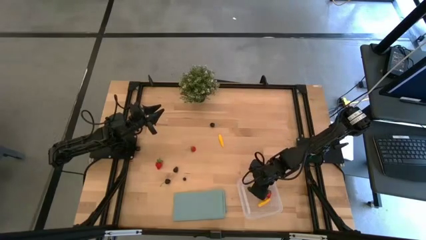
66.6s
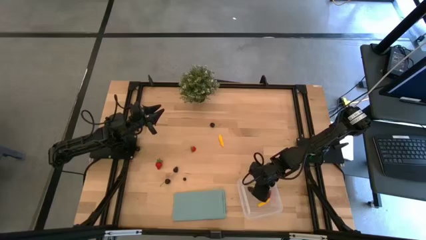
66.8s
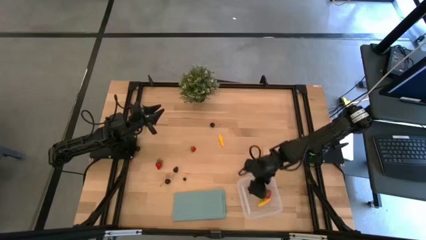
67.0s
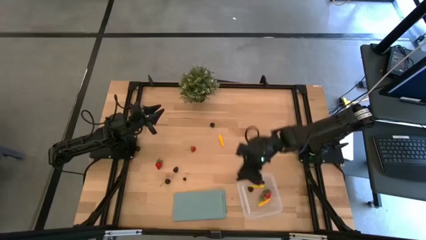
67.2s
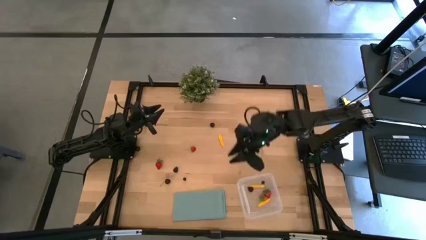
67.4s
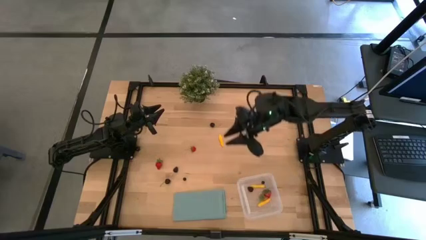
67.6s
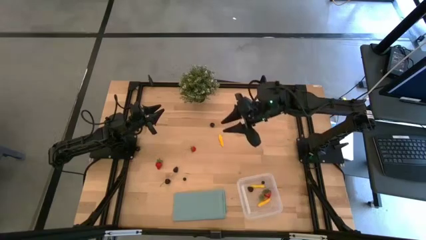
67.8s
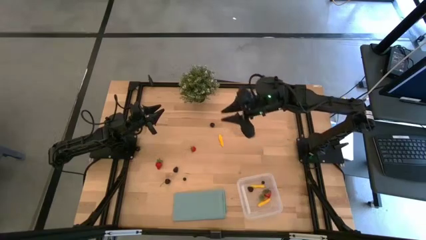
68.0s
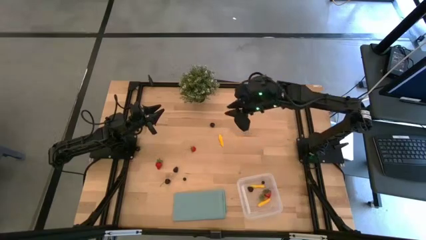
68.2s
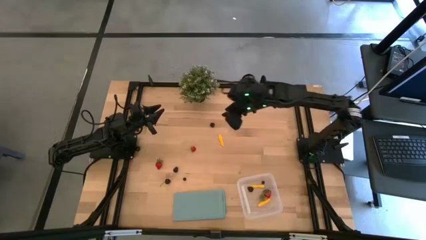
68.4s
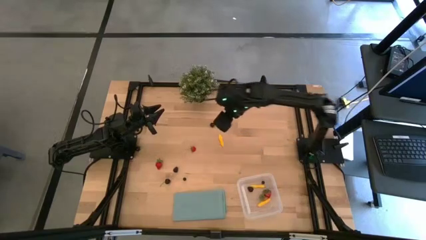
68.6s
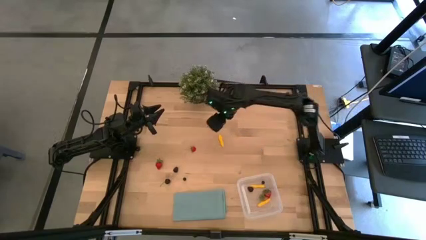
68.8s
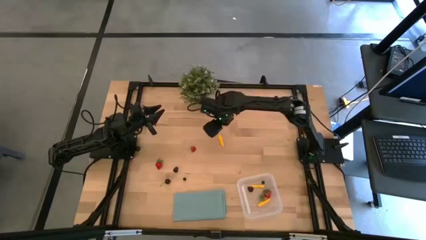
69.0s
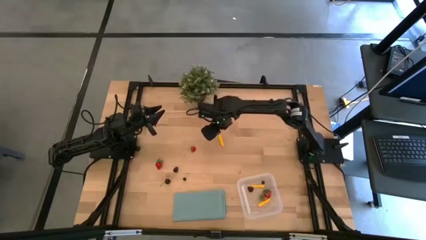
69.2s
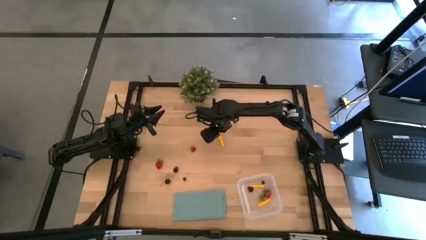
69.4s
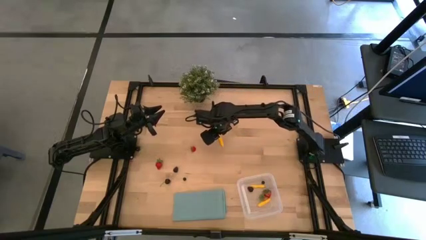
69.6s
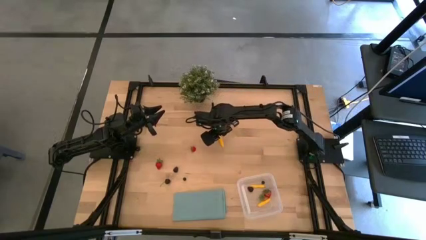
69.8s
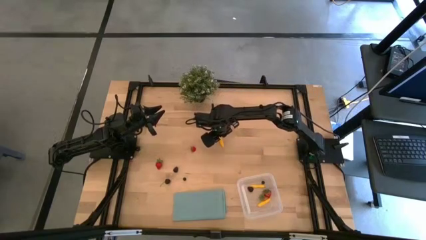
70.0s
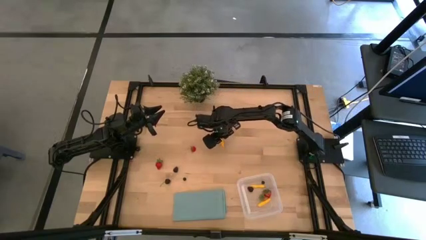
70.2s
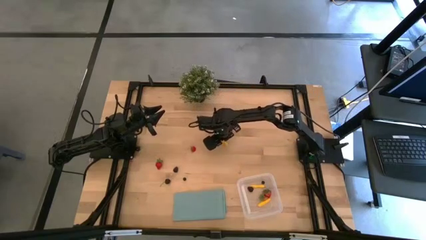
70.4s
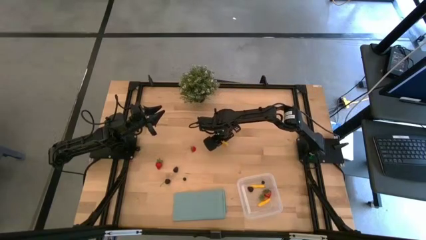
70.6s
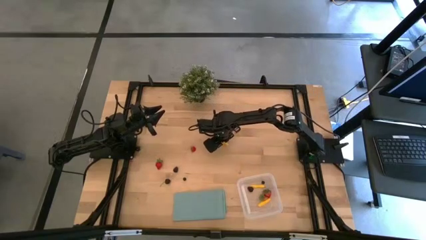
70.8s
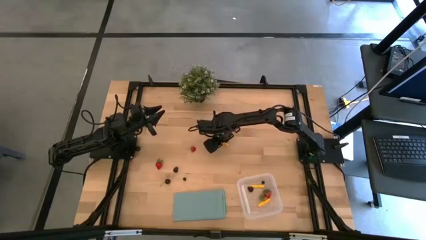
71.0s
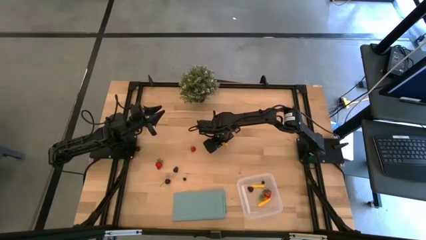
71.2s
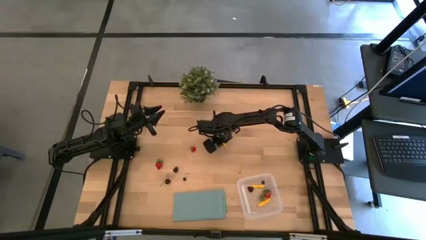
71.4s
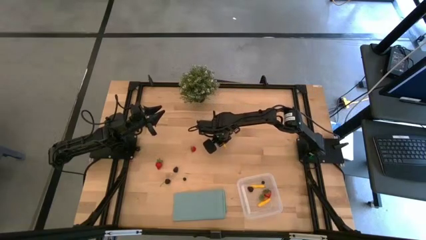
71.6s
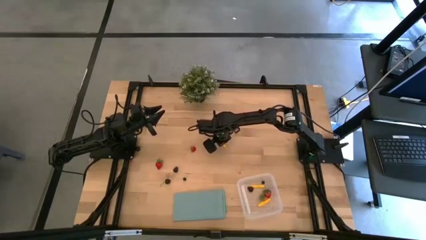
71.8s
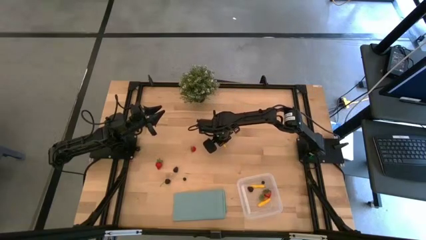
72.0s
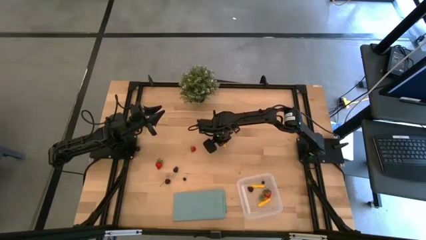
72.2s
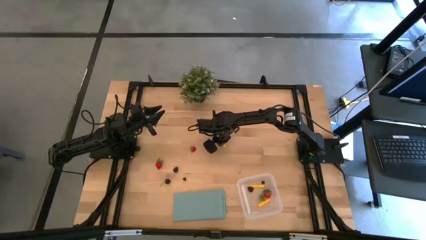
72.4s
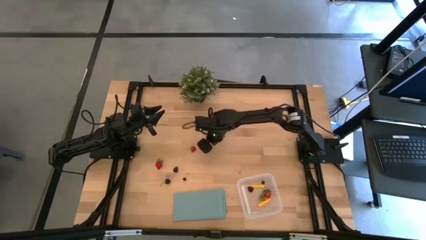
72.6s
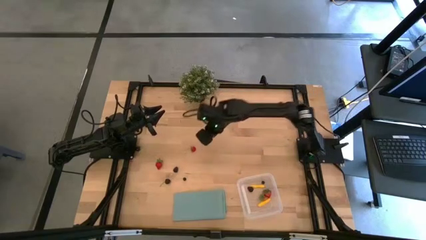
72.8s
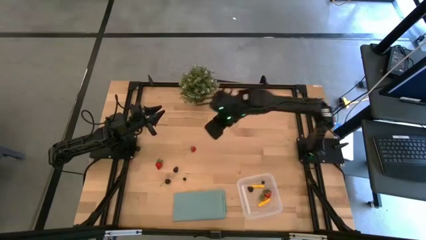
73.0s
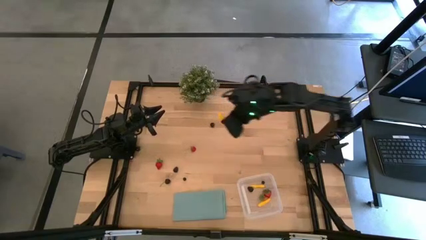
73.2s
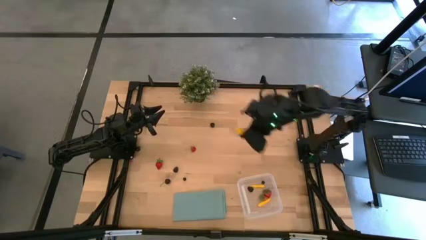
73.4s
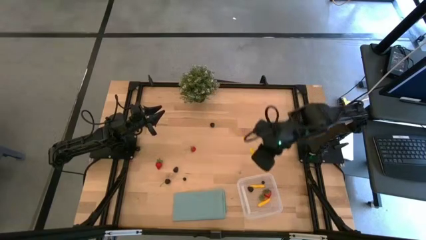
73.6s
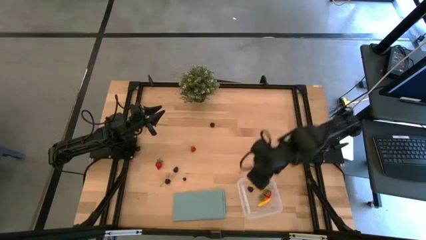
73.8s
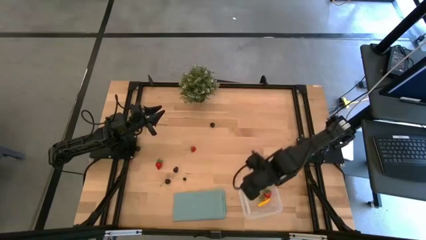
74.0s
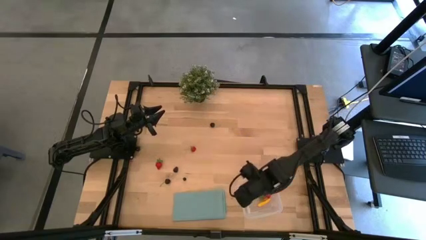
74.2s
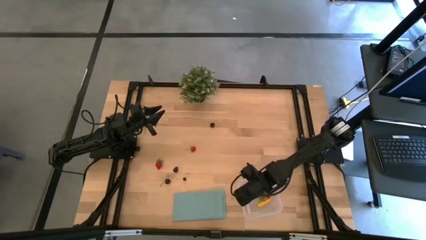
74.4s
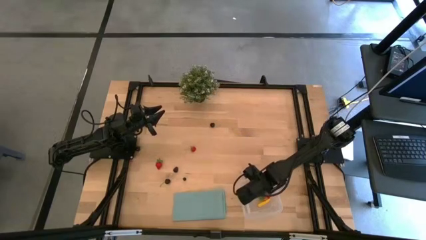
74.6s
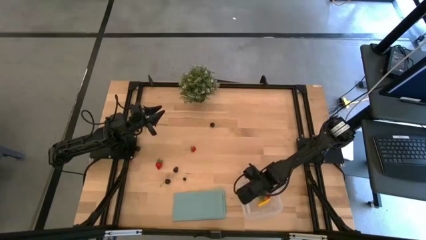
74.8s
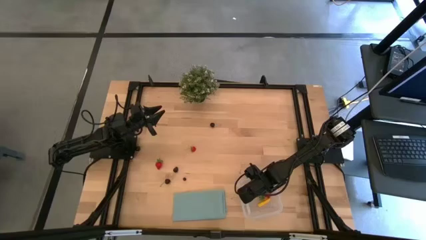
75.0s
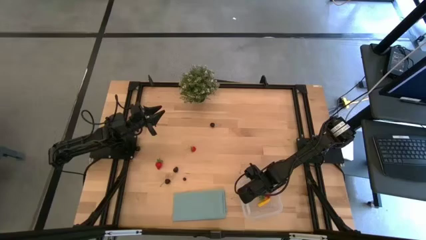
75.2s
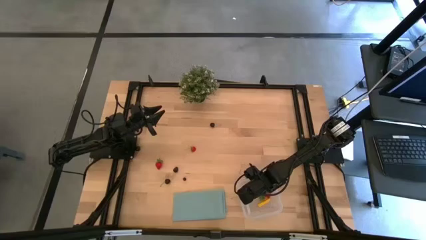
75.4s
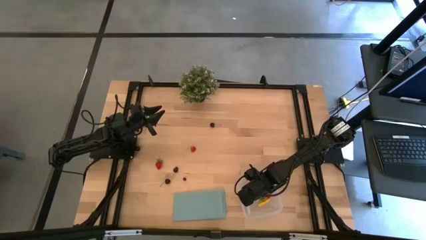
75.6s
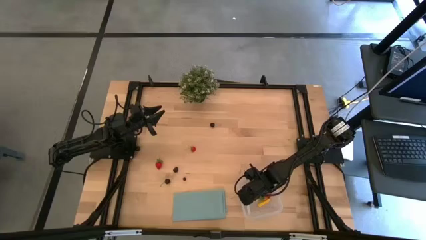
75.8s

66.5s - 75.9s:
Task: Pick and placing Produce into tupperware
Put the yellow corn into the transparent bin

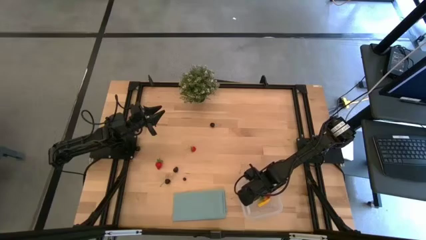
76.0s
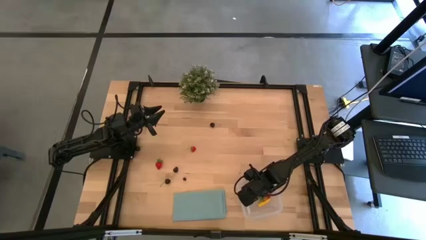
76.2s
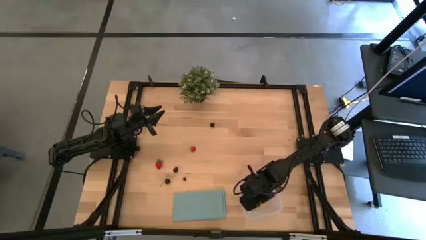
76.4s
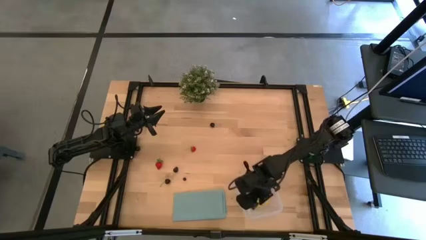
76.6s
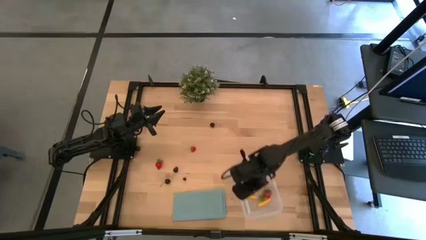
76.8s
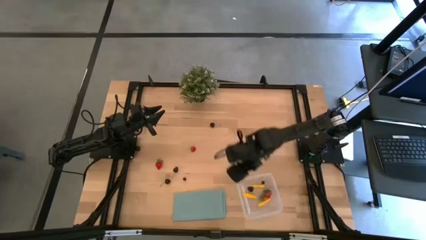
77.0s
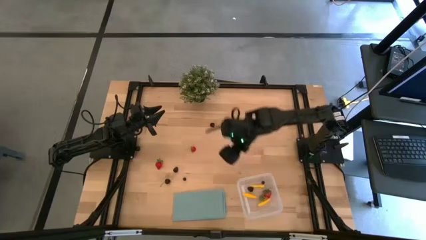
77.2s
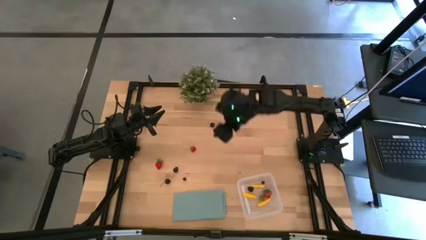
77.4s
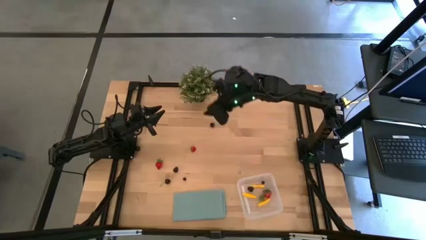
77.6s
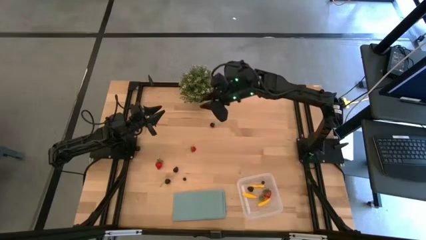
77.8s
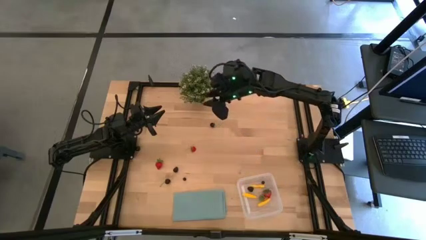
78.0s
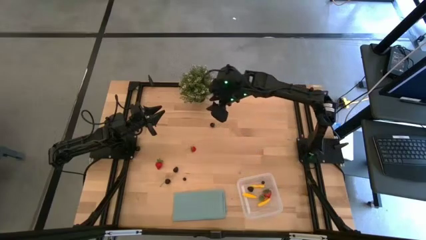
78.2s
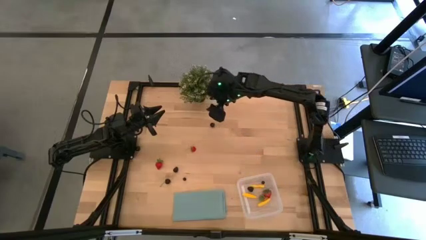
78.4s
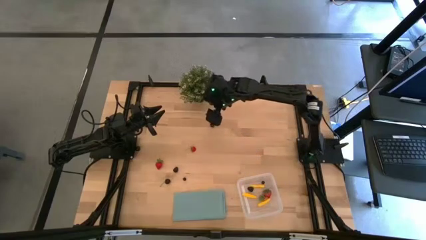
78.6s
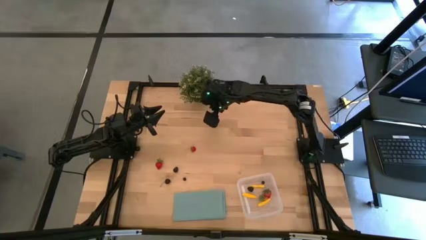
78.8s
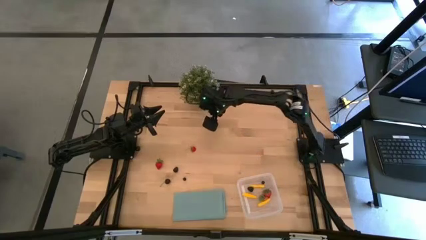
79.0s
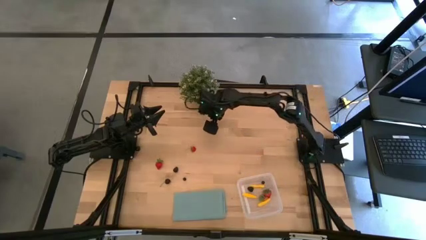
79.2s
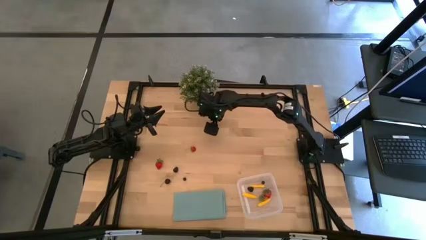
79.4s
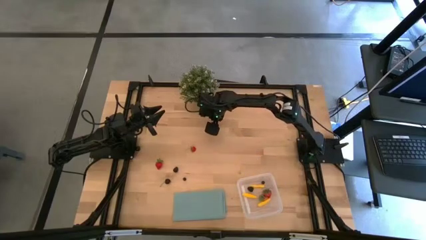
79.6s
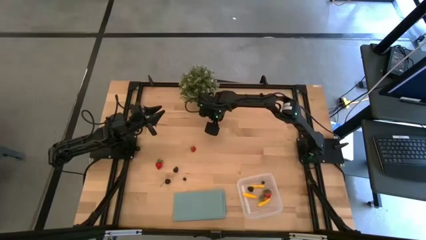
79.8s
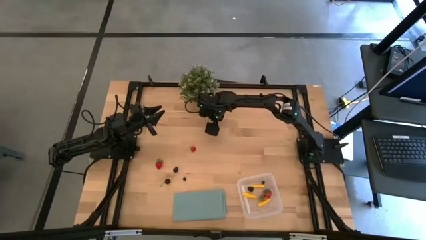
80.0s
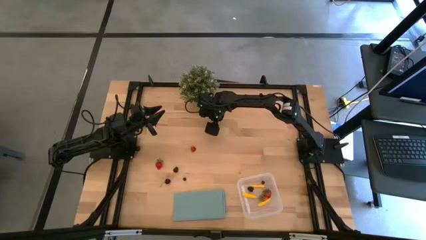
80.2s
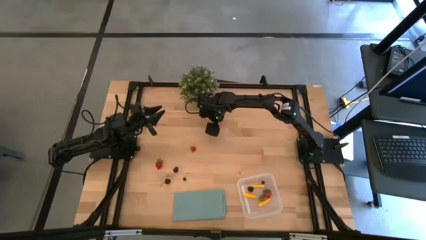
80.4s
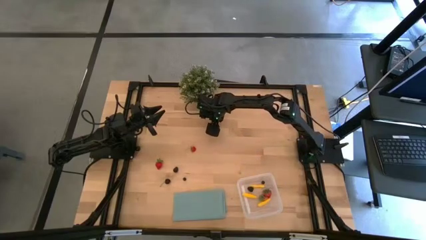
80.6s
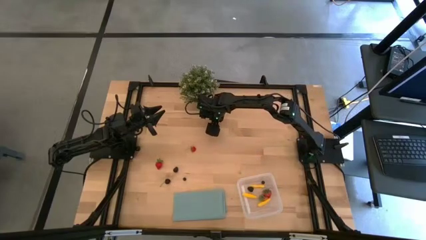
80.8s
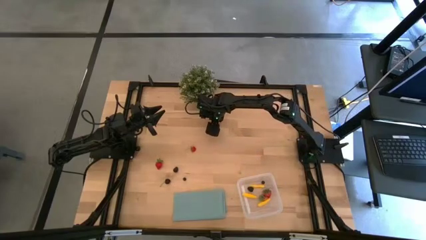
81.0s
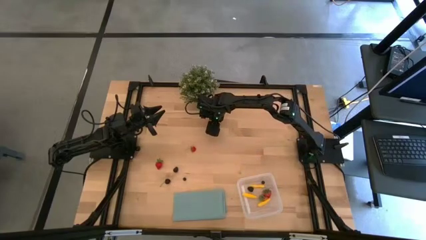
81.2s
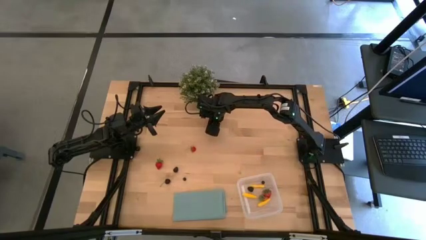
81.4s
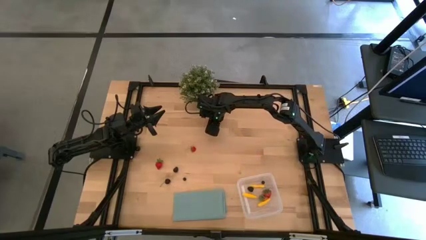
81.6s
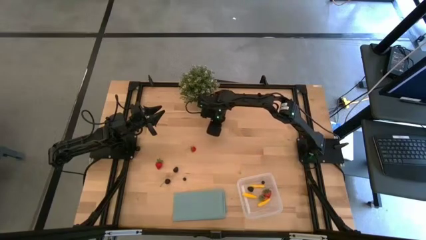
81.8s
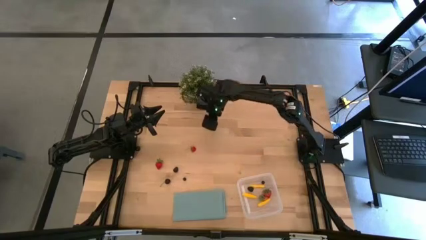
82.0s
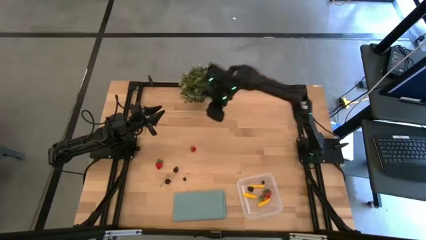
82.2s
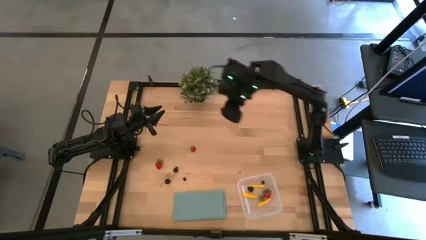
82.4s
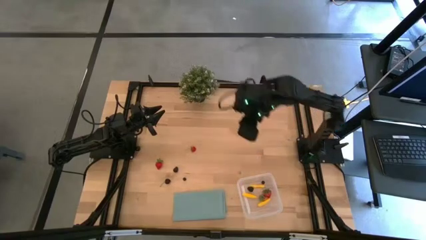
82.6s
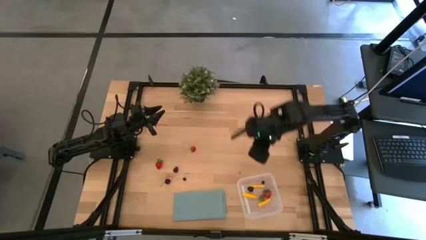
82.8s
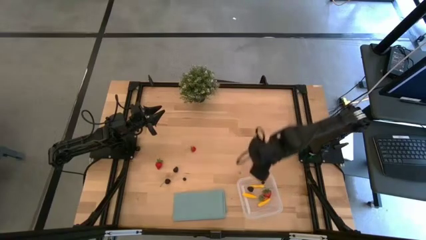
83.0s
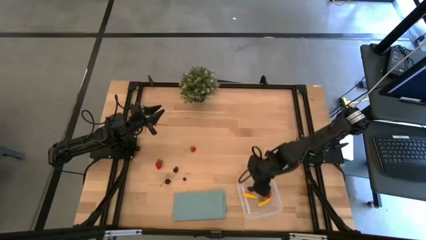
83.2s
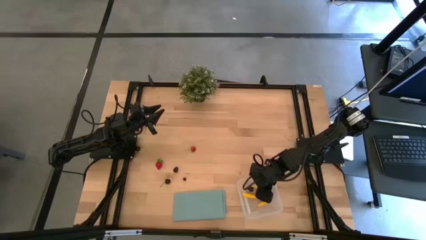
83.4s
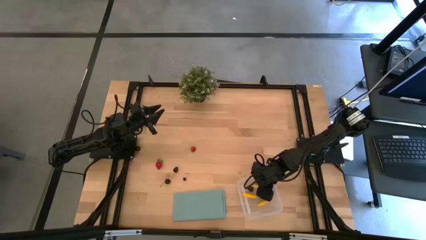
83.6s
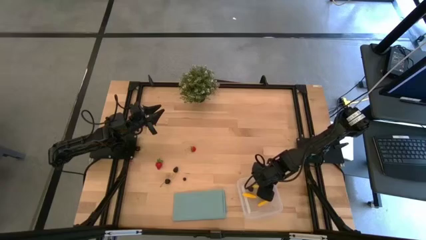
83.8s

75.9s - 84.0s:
Put the black cherry into the transparent bin
